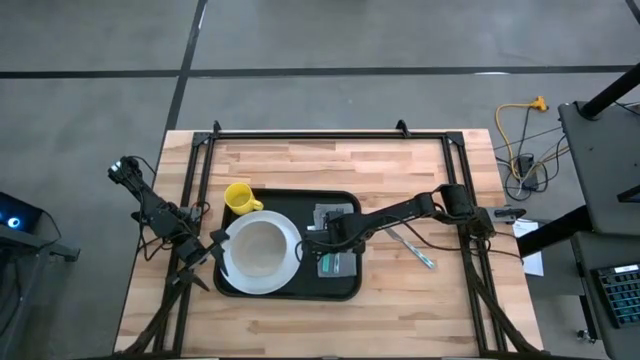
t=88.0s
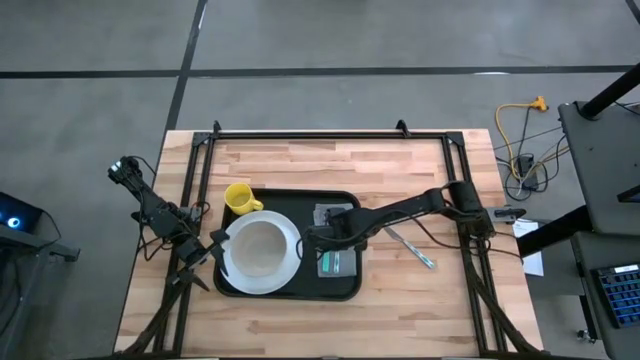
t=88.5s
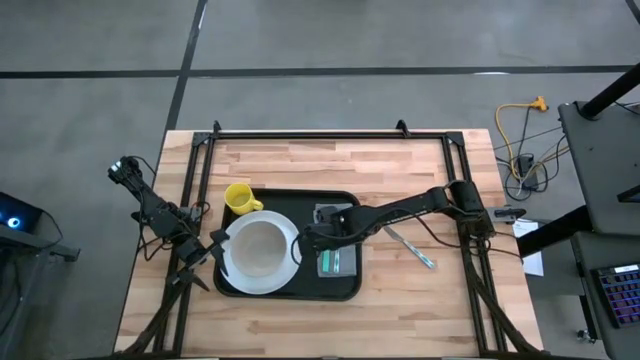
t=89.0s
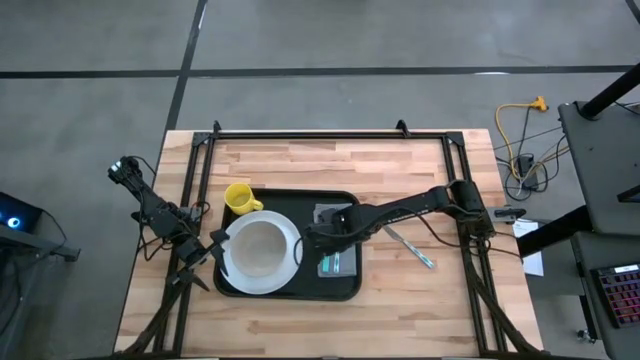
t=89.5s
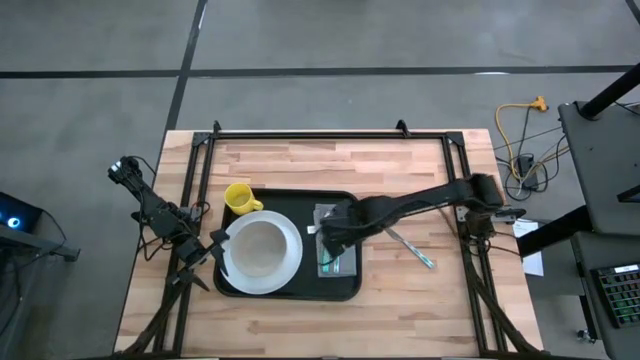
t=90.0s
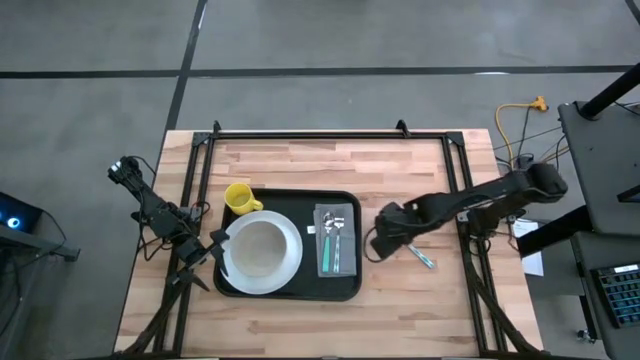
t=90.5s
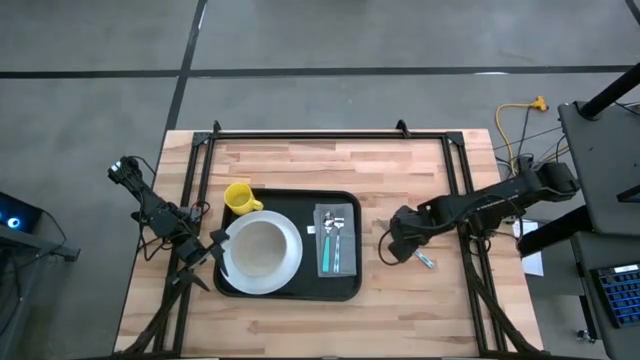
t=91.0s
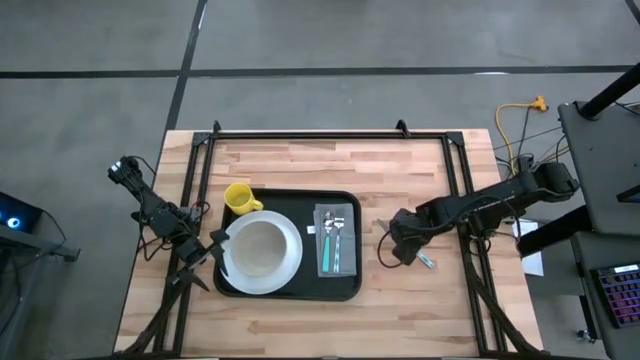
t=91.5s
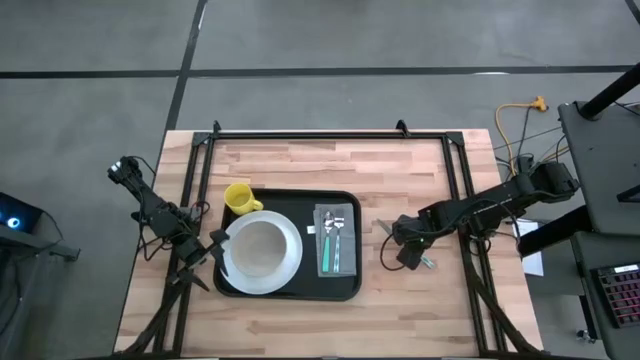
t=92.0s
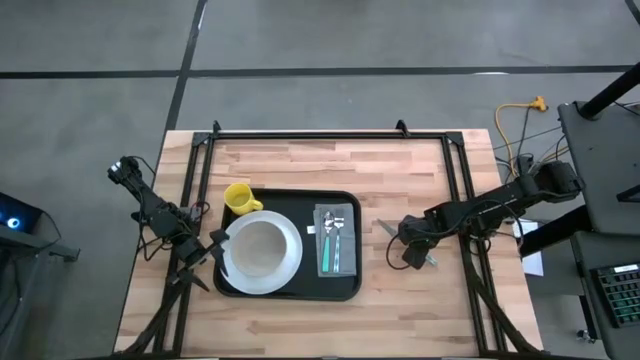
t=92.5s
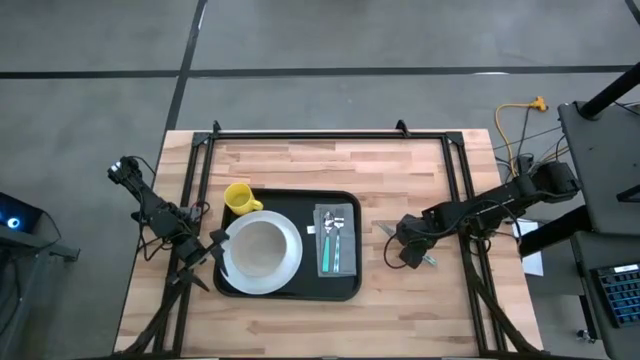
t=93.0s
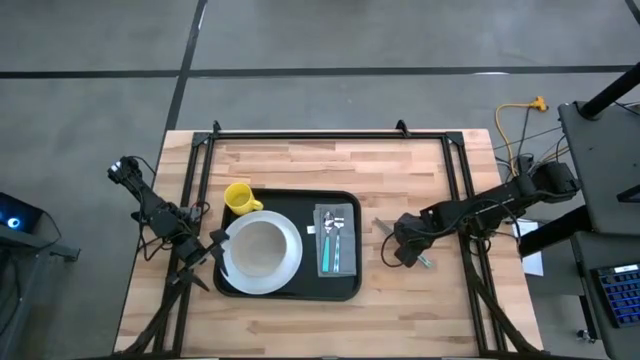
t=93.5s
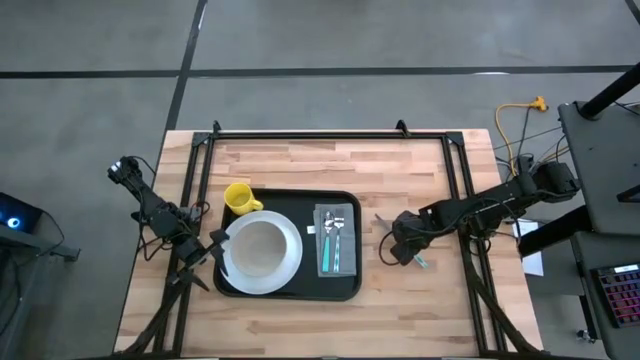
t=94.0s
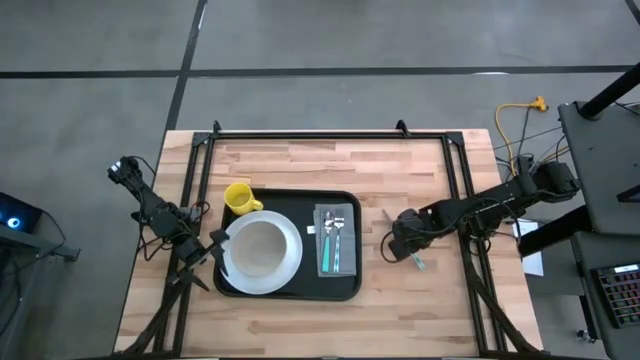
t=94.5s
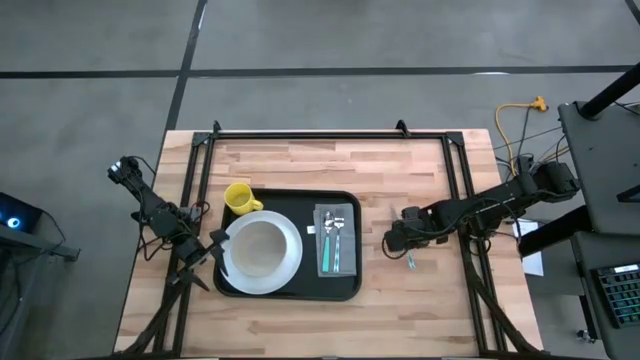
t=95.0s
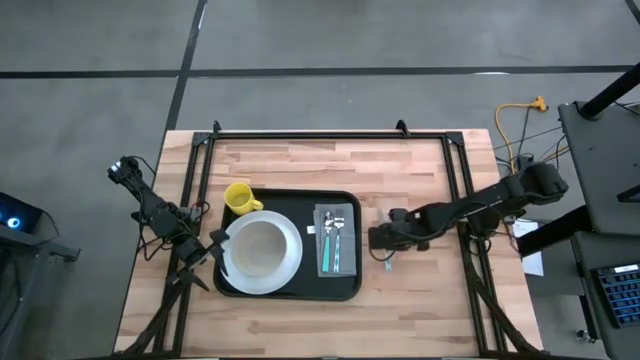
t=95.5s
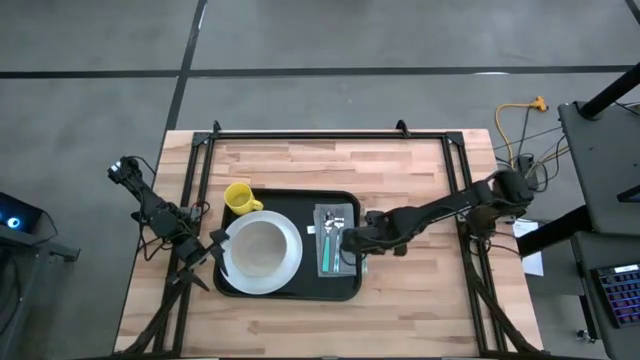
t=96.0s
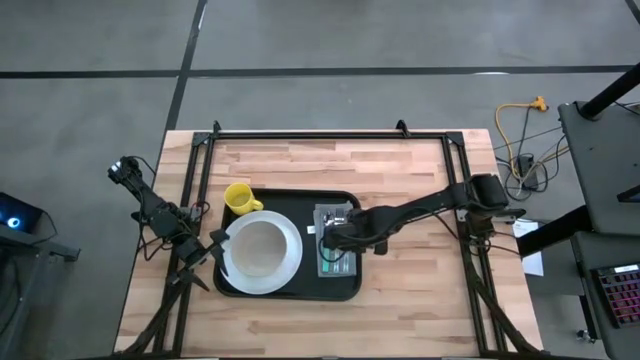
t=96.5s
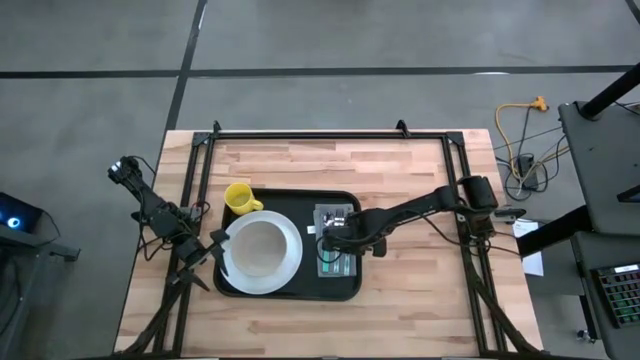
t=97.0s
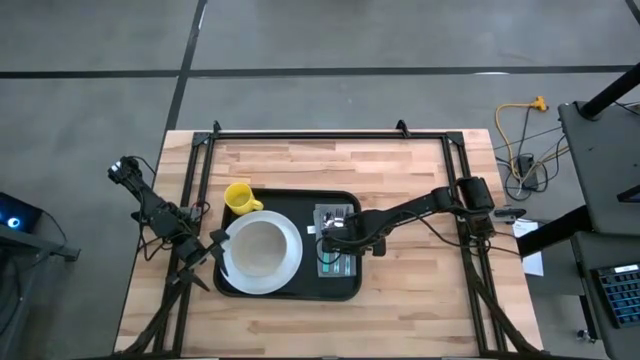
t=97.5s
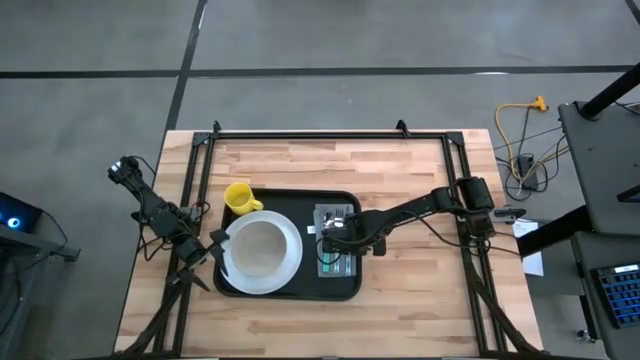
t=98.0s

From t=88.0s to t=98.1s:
Task: Set up tray
Put the white and blue knife on the gray napkin to the right of the white and blue fork

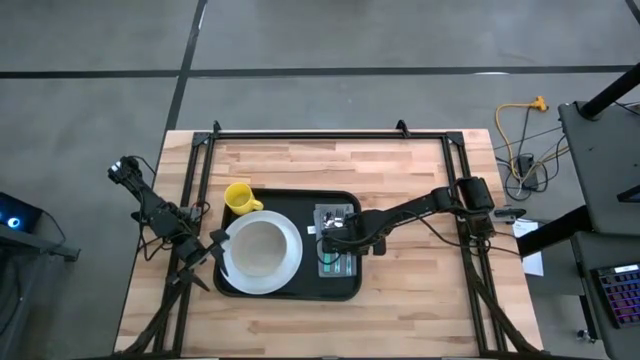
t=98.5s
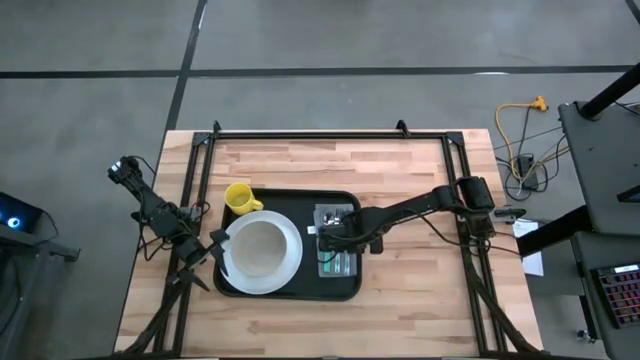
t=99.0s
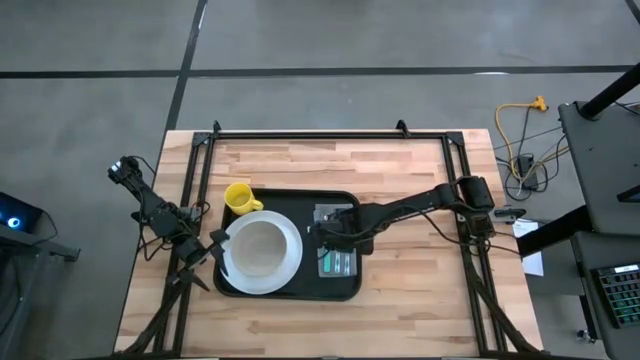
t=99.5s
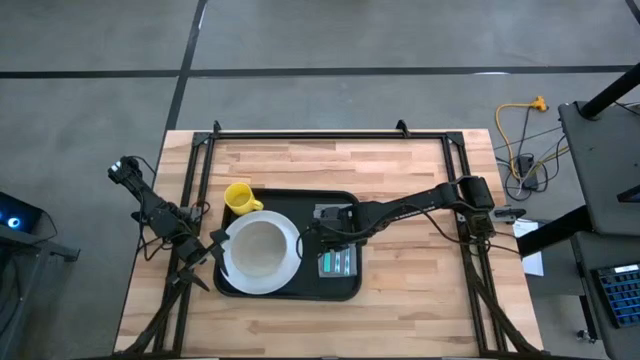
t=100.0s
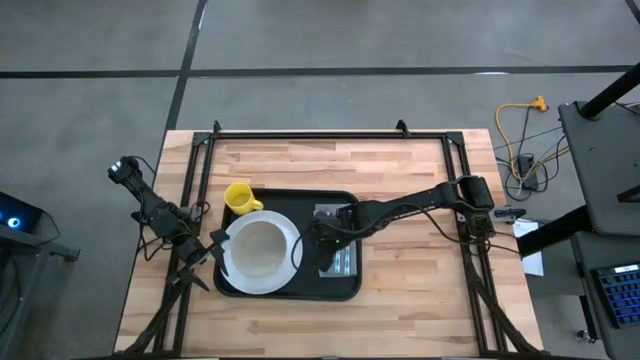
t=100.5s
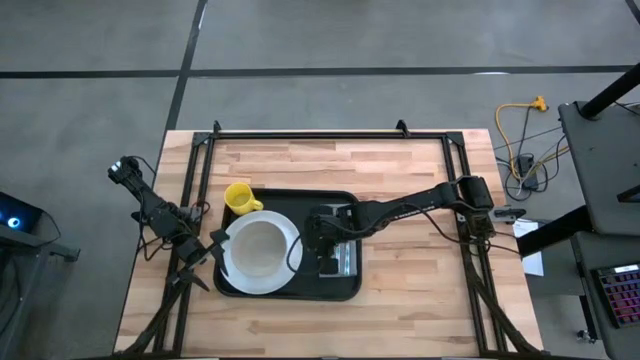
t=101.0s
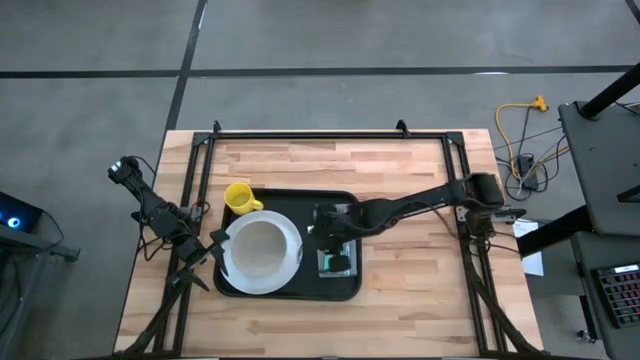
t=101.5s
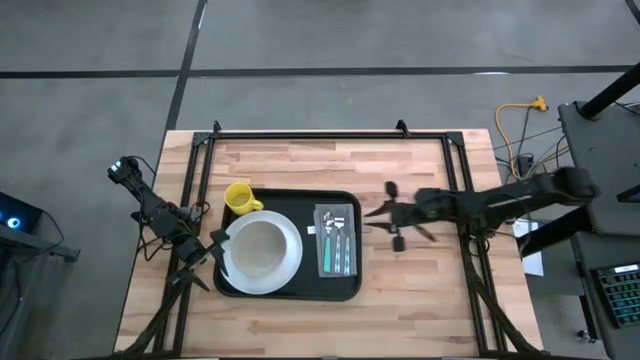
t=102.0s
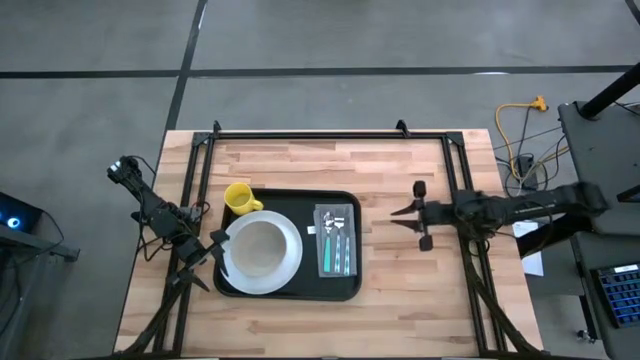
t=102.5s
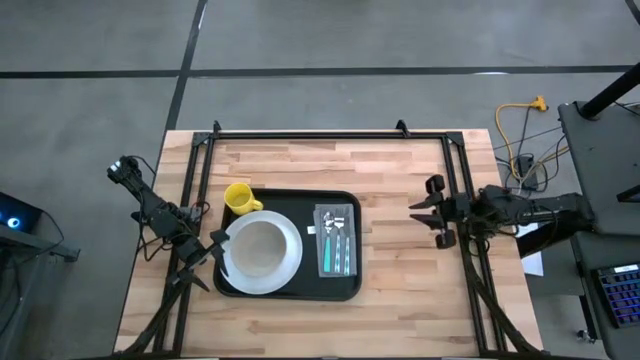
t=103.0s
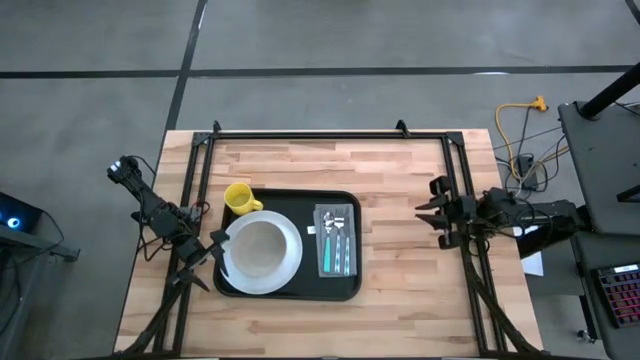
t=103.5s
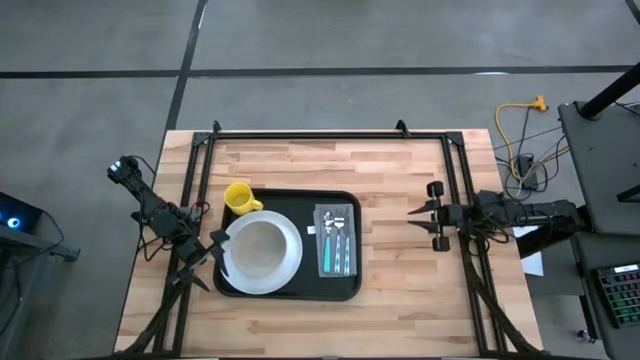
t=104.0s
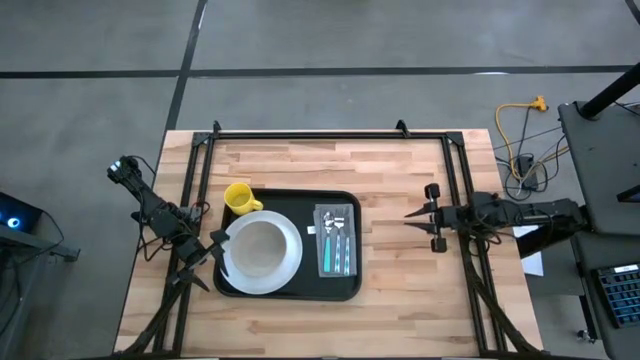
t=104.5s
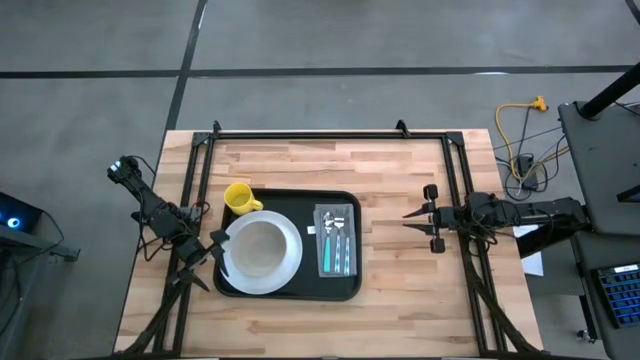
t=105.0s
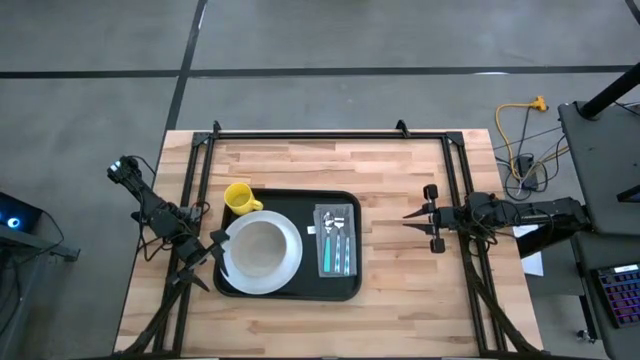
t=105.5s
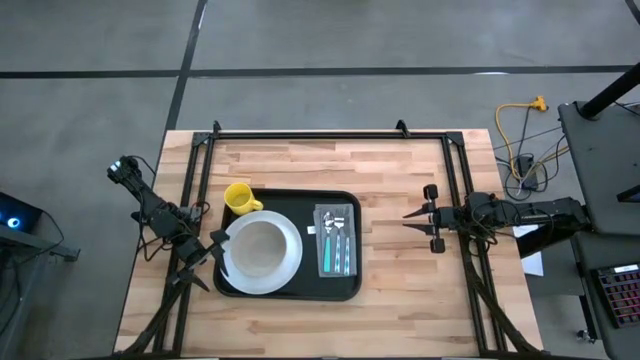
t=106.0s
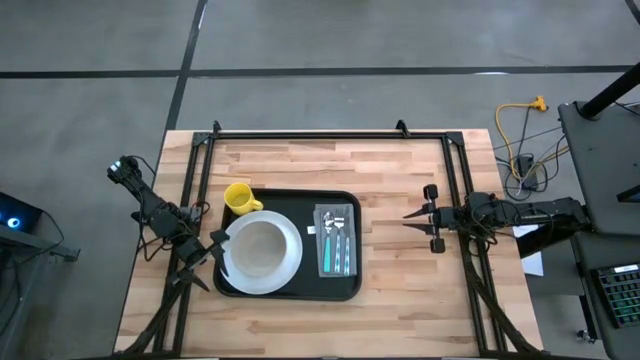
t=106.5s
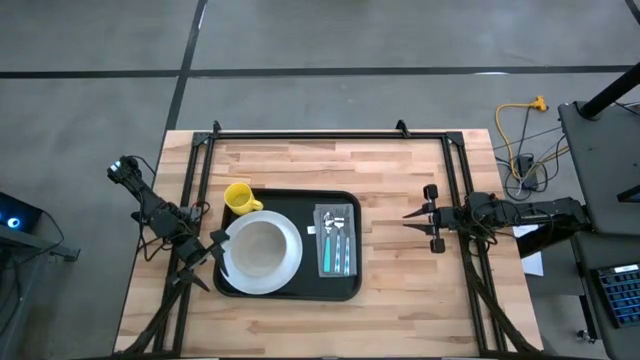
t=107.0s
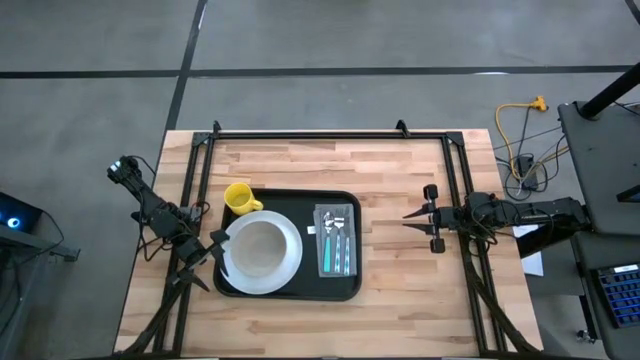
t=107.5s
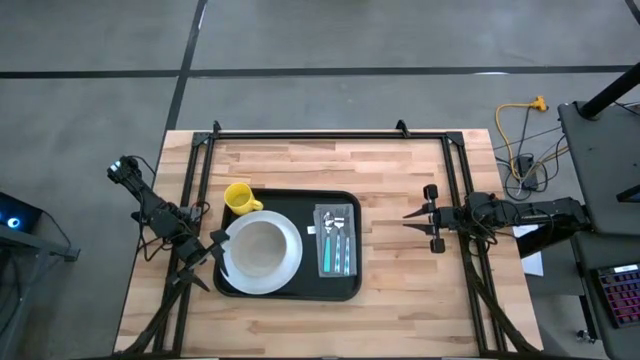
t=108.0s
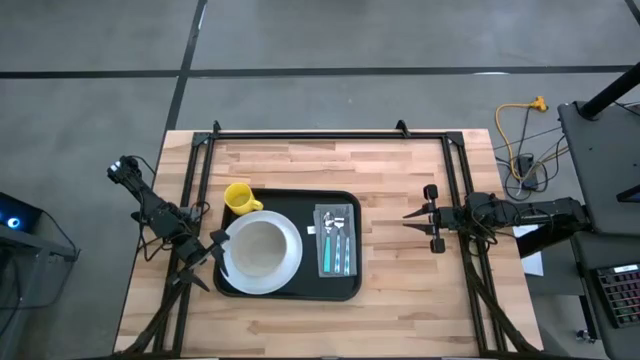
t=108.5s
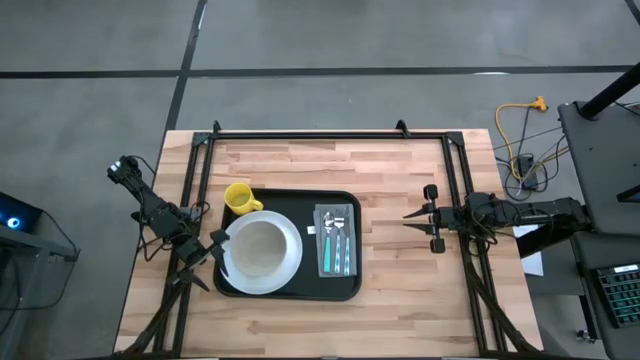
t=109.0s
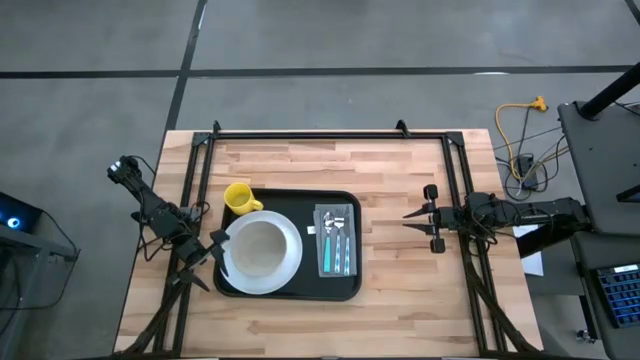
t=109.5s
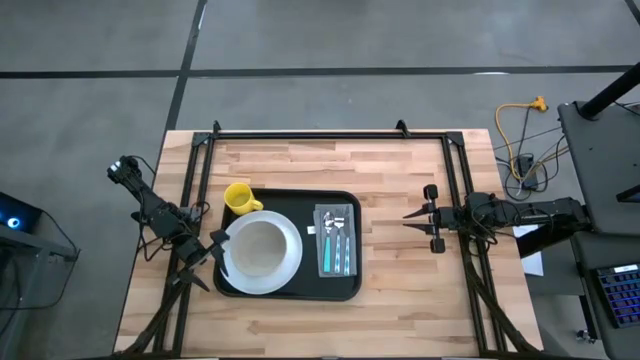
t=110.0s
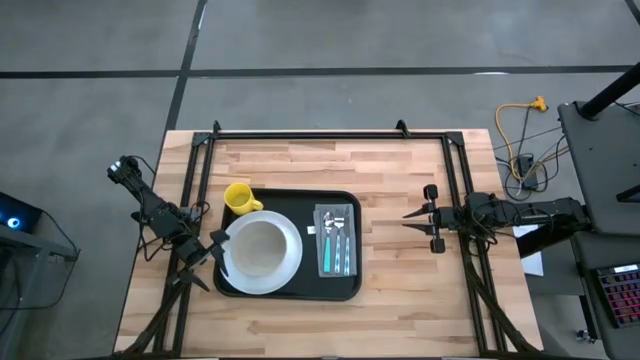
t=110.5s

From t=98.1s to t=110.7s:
Return to Home Position
